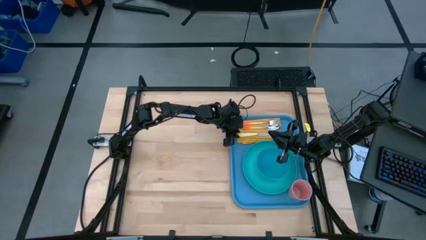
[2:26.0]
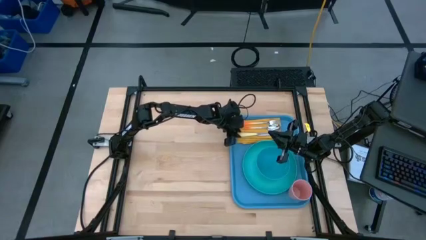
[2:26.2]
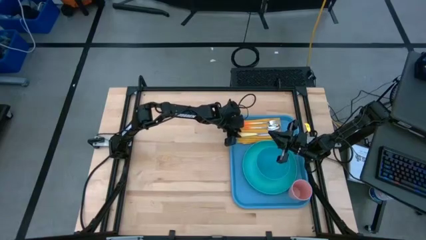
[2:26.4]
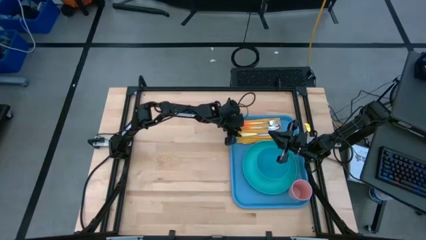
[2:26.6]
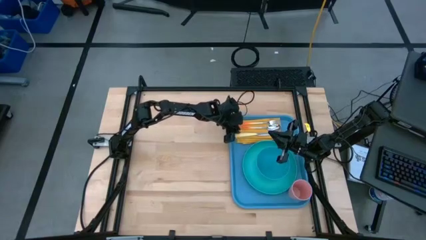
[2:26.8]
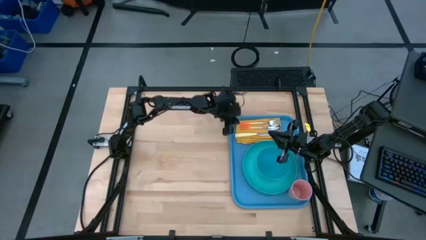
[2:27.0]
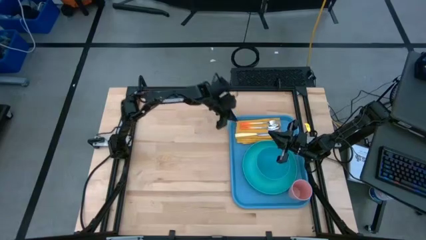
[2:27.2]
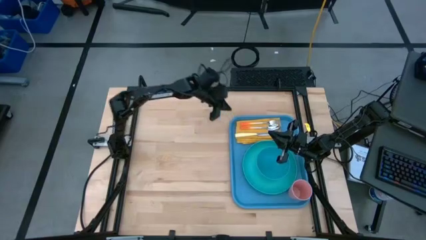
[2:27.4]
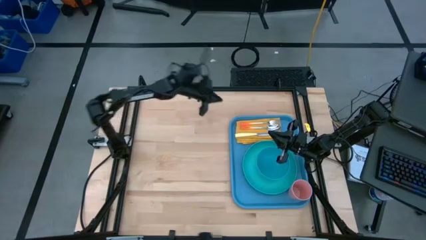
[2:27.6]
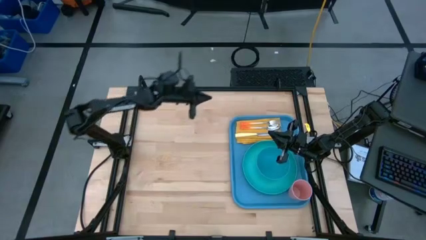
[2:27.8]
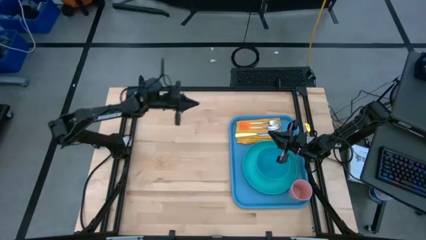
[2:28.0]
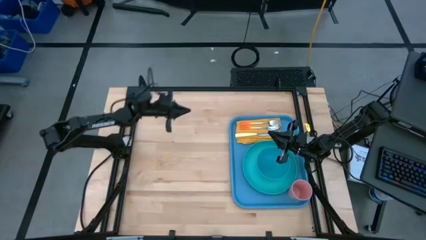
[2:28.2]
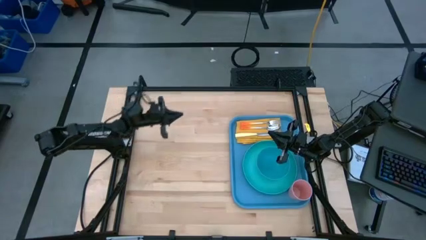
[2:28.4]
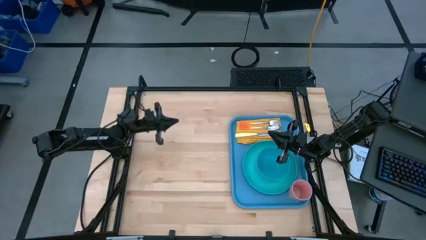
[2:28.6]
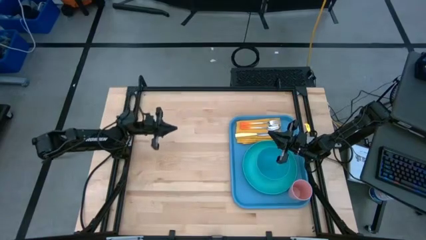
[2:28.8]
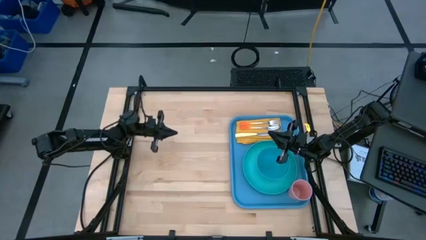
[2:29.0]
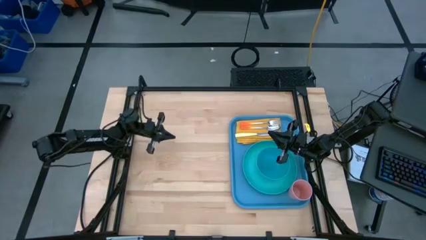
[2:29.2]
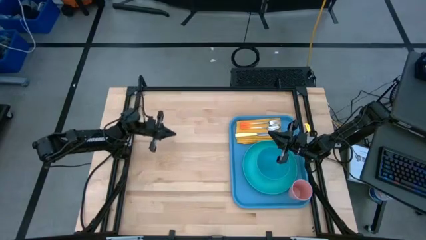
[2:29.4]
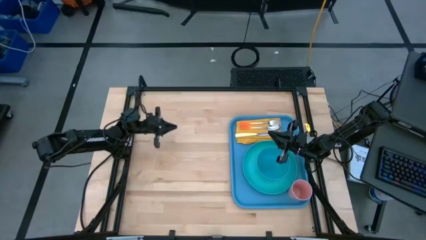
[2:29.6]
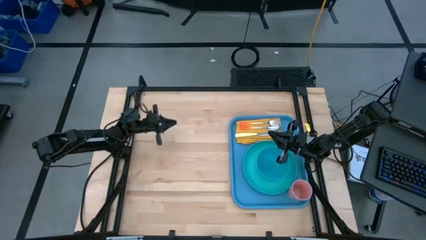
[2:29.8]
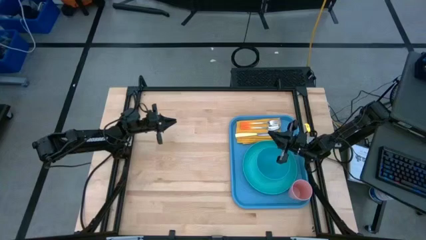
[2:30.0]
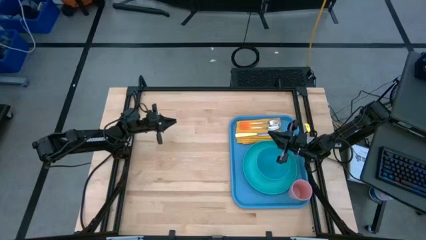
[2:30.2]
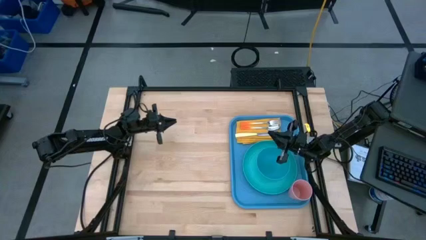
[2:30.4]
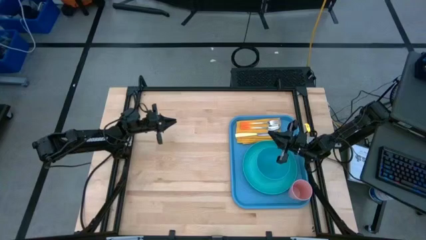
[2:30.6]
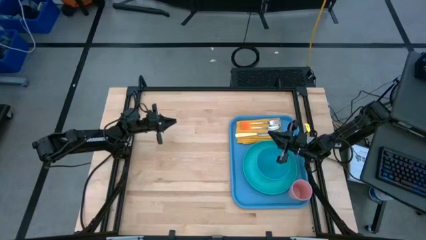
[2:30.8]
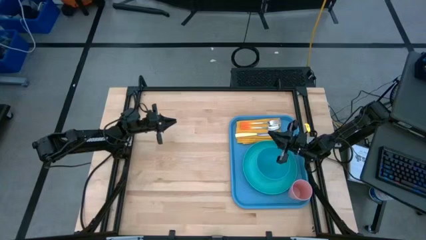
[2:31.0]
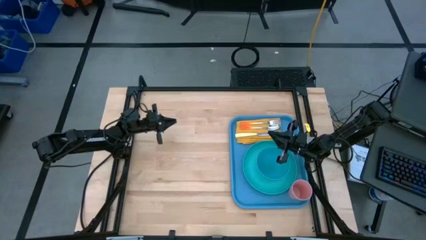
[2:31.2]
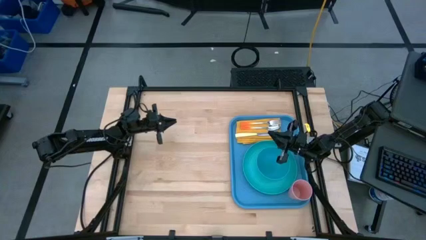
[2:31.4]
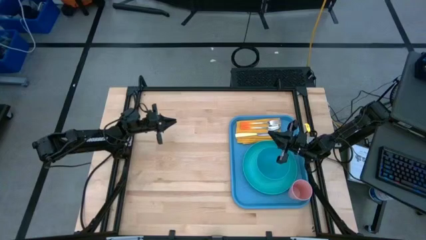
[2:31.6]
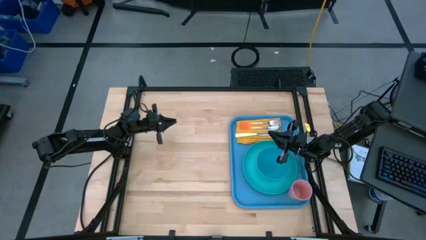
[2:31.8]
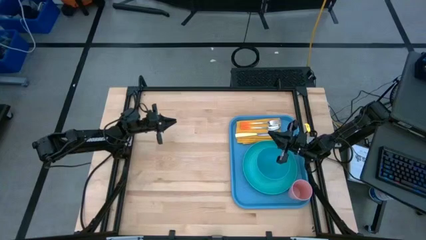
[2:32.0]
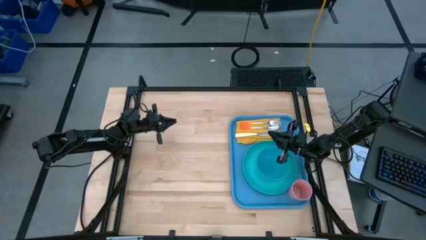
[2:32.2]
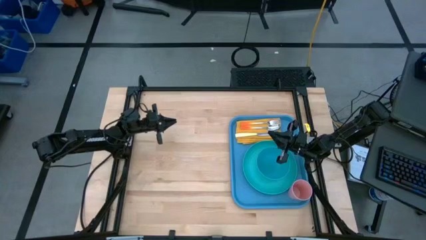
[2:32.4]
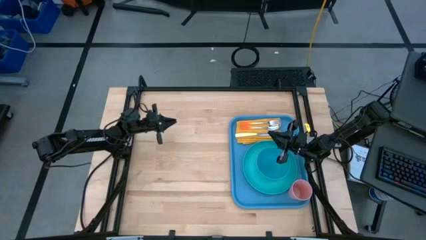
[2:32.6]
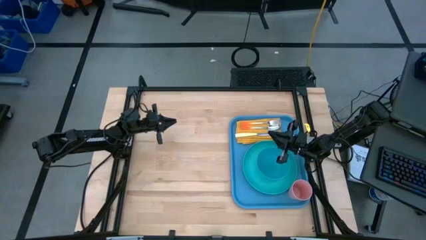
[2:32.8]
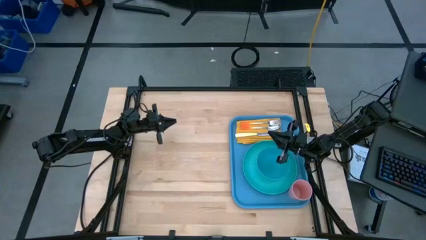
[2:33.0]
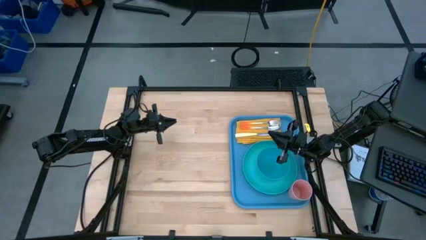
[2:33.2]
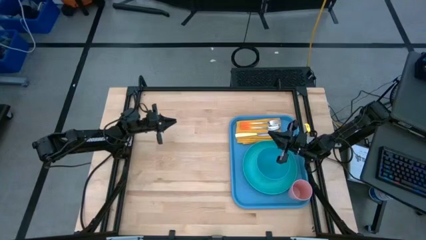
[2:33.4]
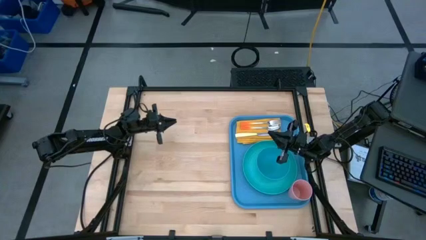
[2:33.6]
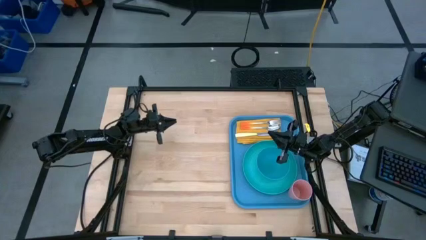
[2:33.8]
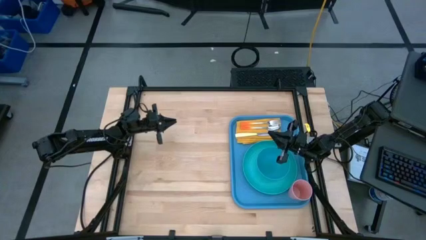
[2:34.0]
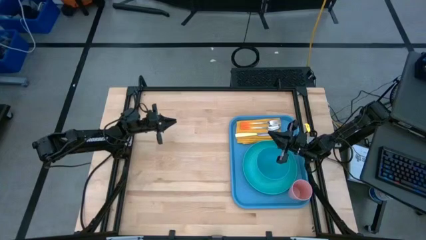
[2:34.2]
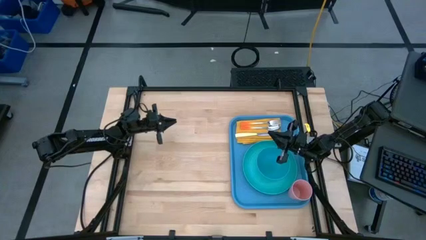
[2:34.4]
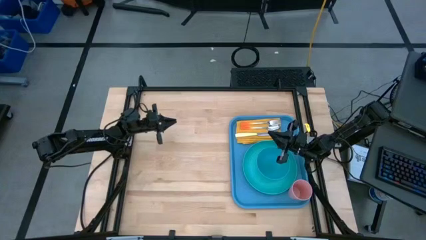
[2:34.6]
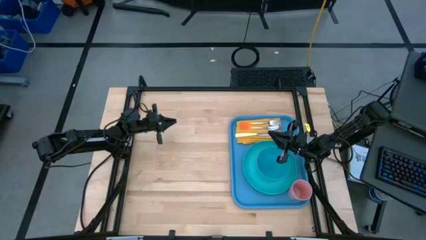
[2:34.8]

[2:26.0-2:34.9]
Task: Set up tray
Return to Home Position
